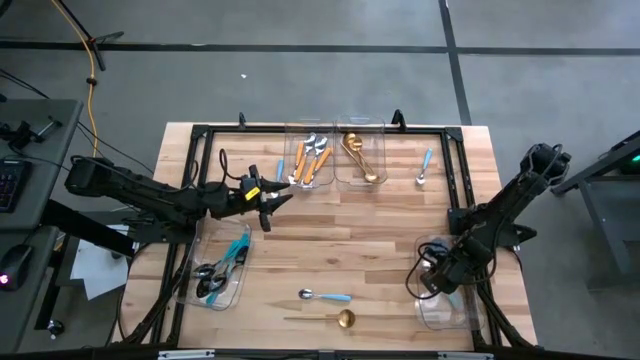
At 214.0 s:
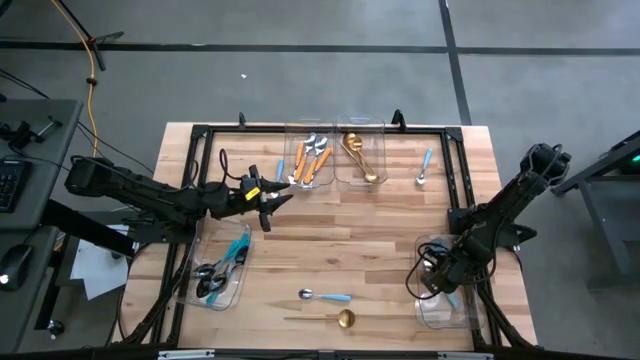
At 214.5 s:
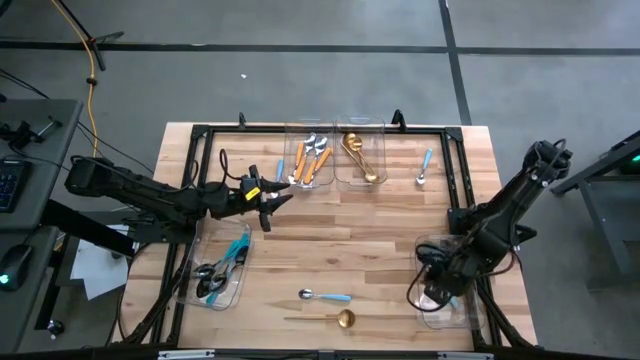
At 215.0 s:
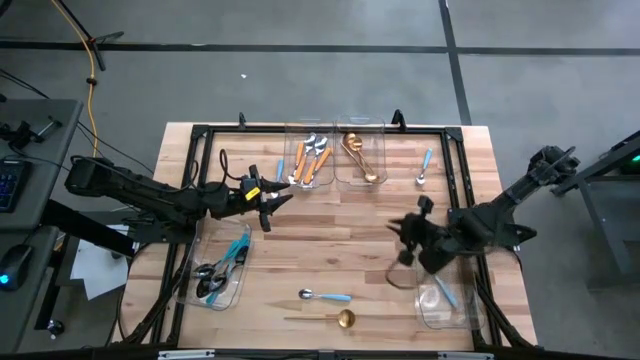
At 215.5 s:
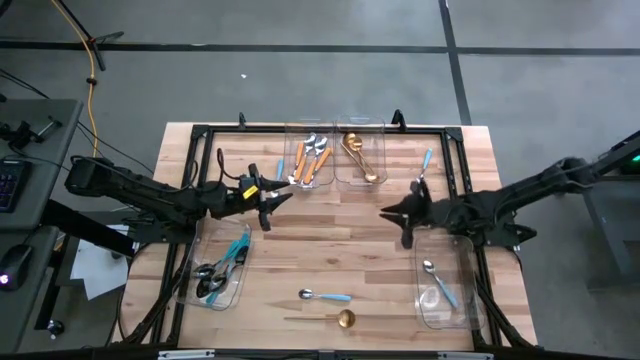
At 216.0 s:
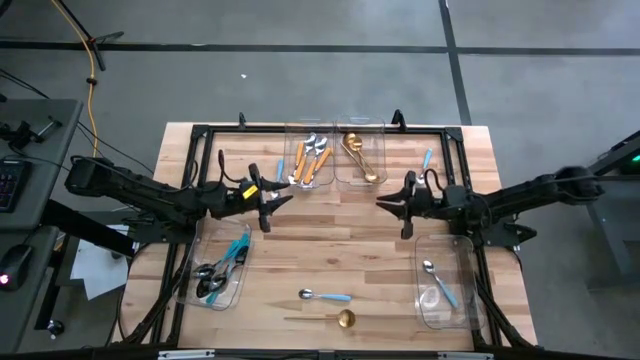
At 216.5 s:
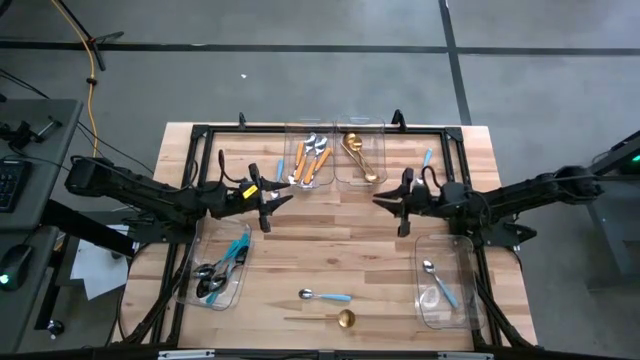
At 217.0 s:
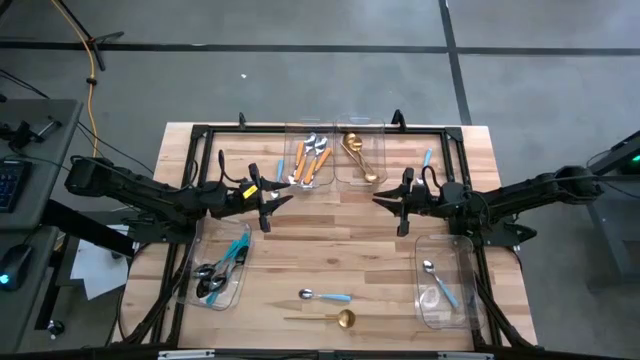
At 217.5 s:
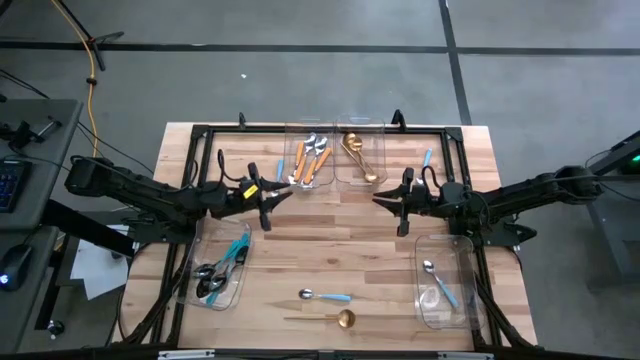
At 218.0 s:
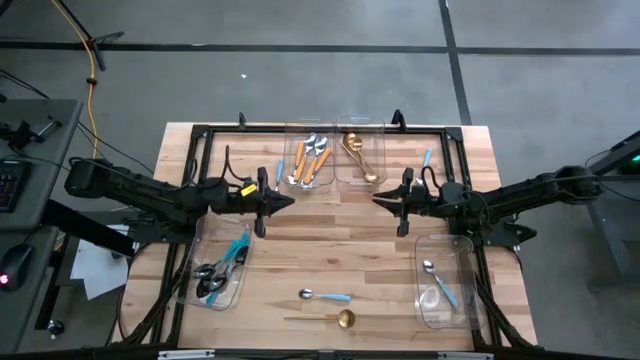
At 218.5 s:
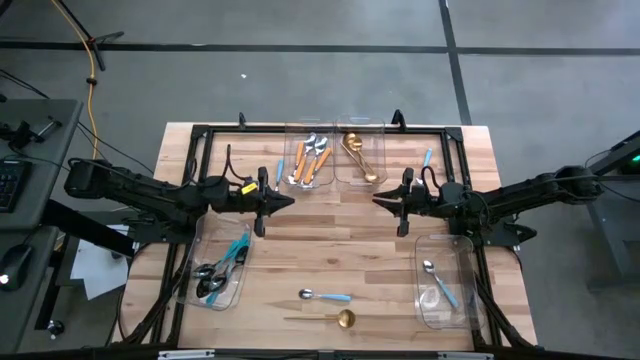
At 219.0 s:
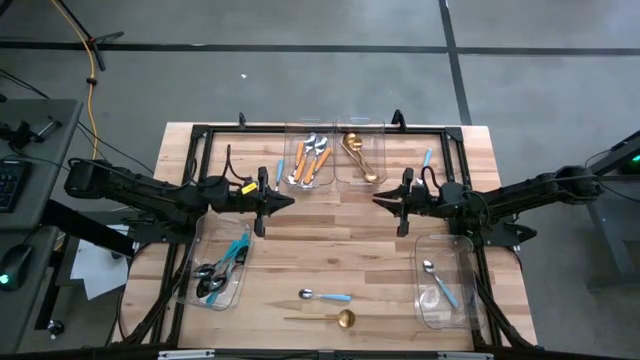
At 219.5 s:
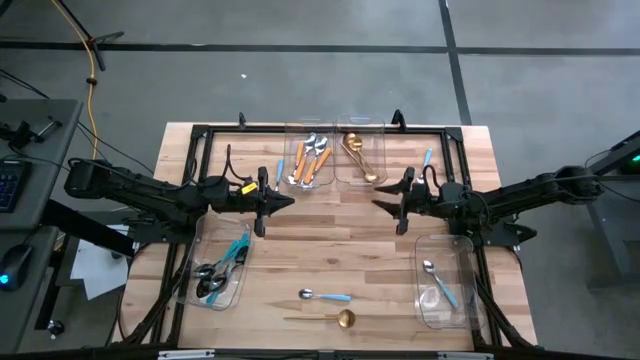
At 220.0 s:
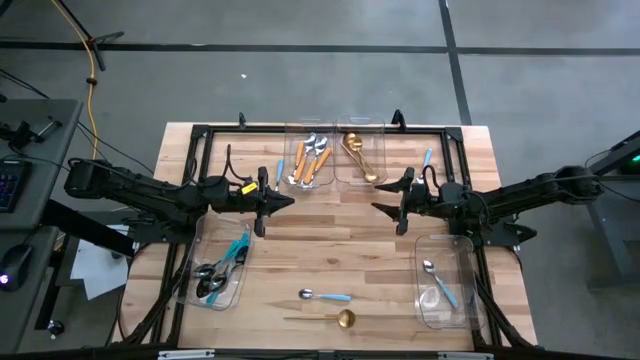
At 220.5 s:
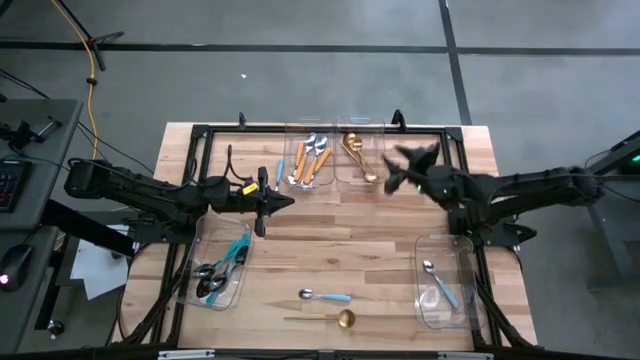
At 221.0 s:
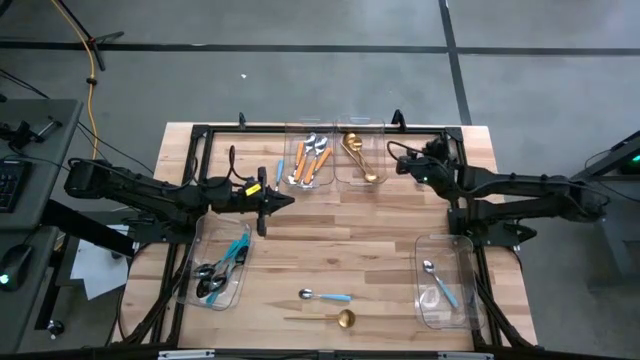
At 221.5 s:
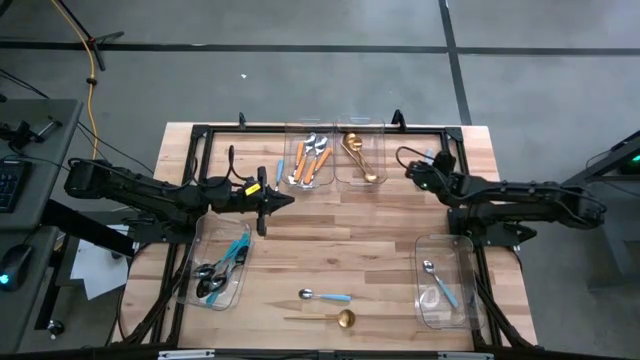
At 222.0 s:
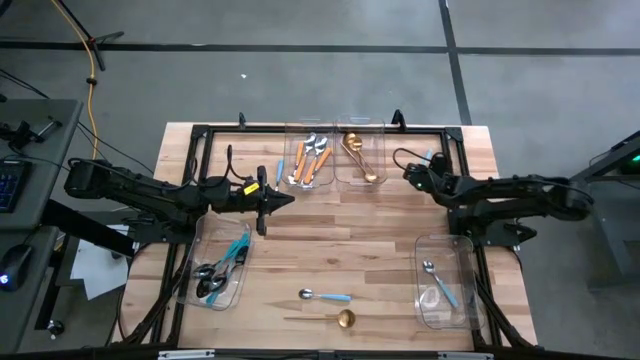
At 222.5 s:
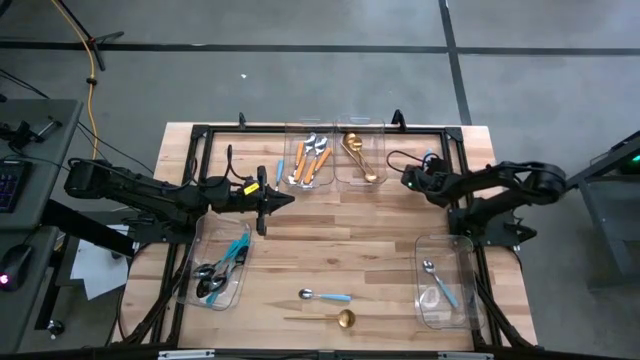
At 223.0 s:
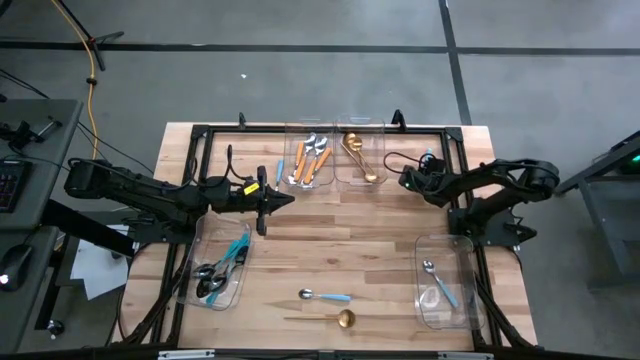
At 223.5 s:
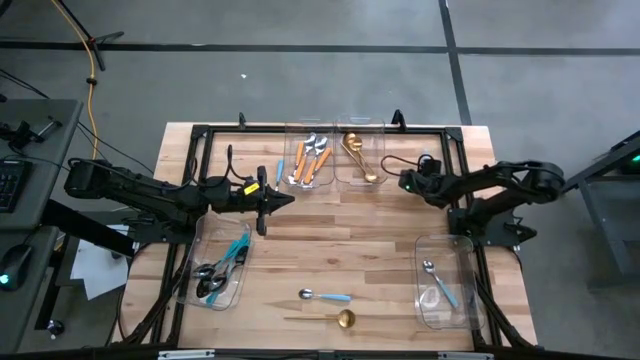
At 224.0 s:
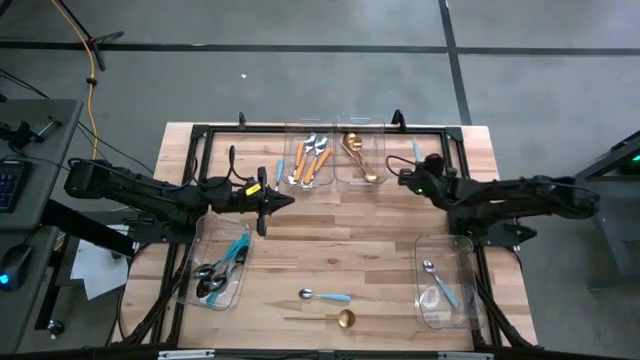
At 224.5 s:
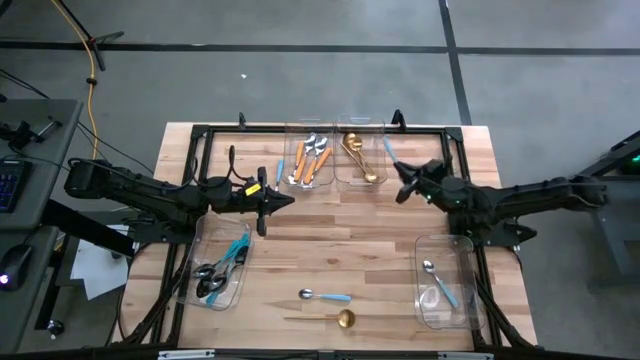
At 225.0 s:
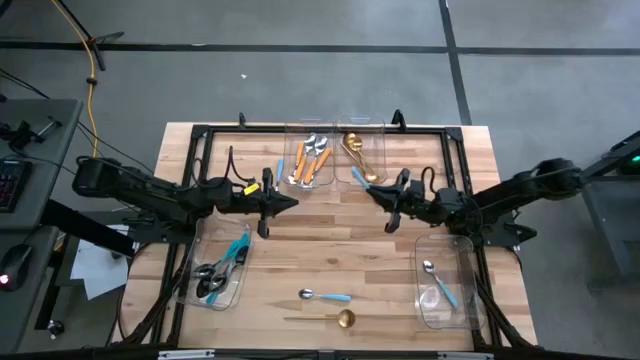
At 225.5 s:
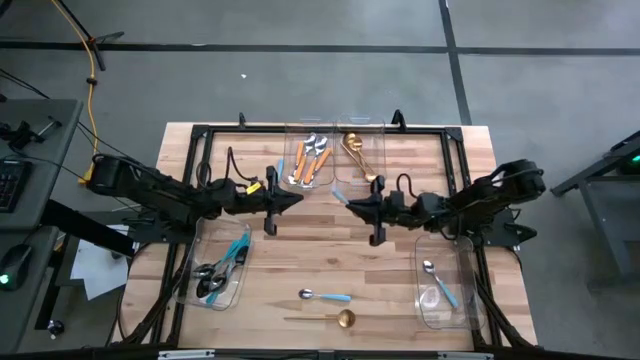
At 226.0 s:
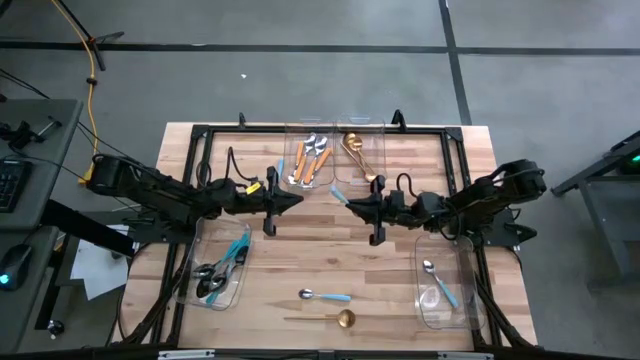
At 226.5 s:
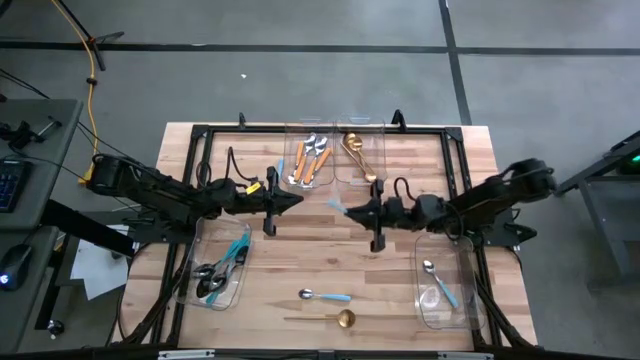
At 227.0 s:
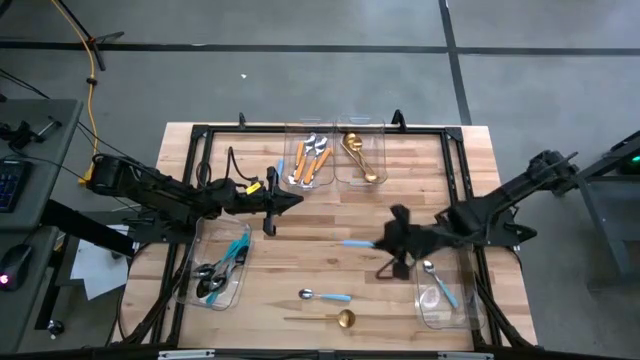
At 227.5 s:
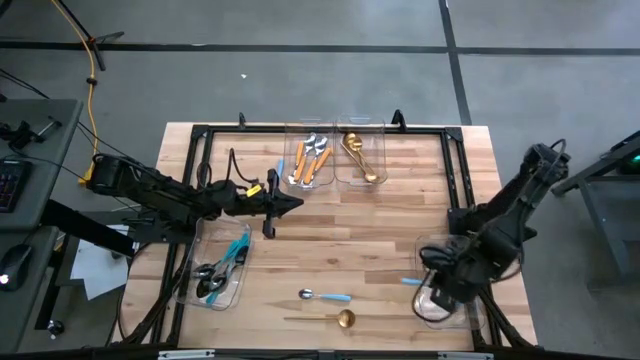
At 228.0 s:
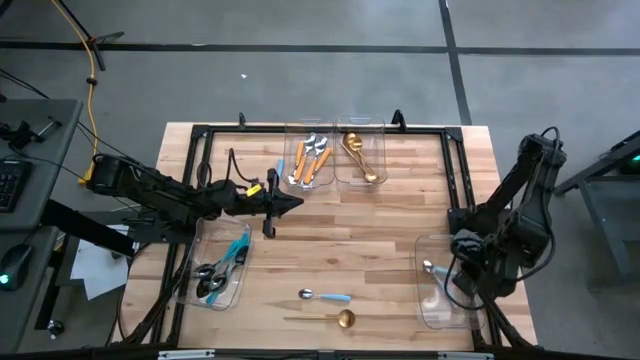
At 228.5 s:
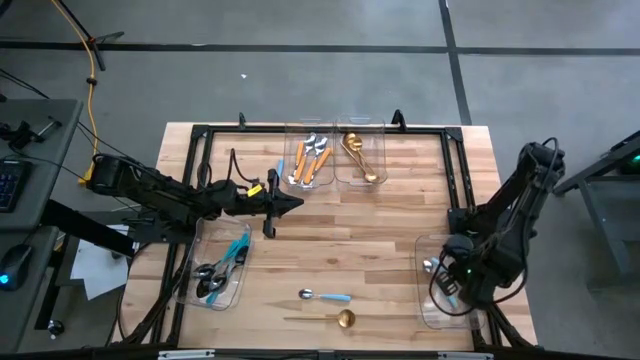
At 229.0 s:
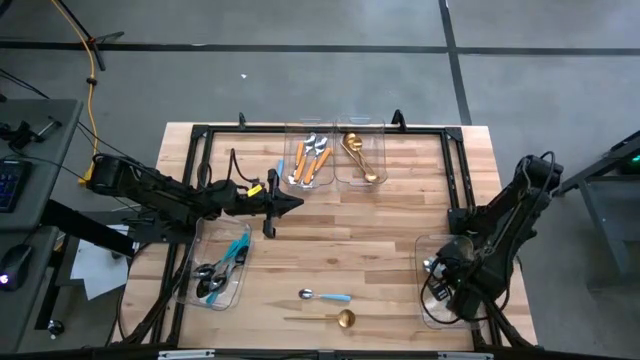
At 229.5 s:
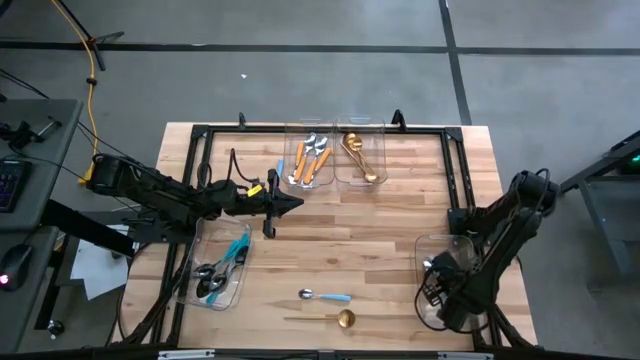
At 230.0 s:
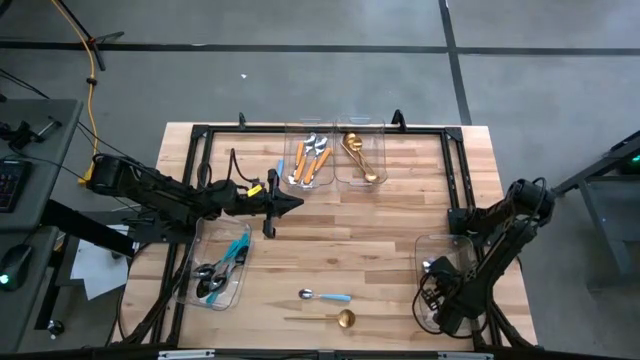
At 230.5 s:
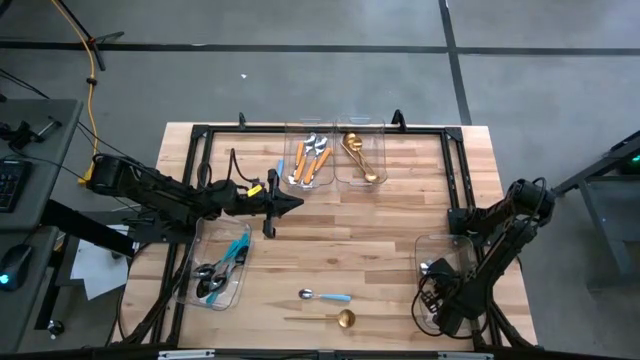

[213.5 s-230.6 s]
Task: Sort silverware by color (type)
Put the blue spoon into the bottom right transparent bin

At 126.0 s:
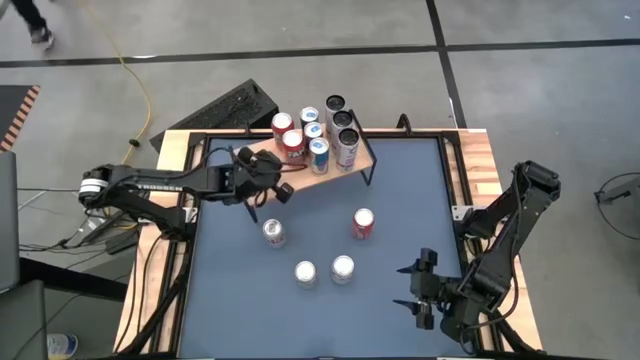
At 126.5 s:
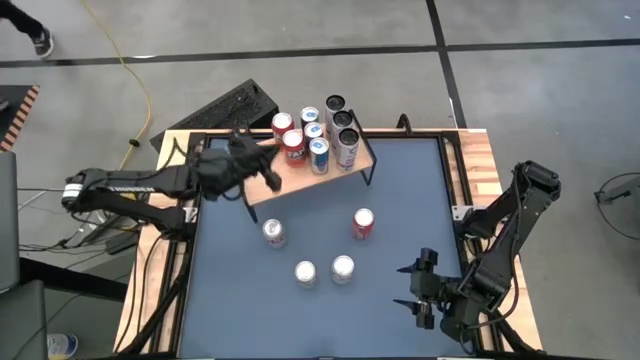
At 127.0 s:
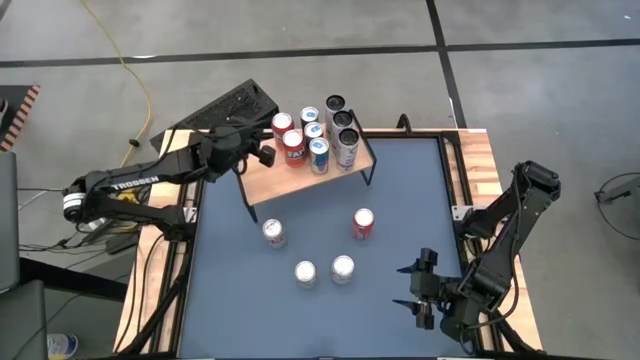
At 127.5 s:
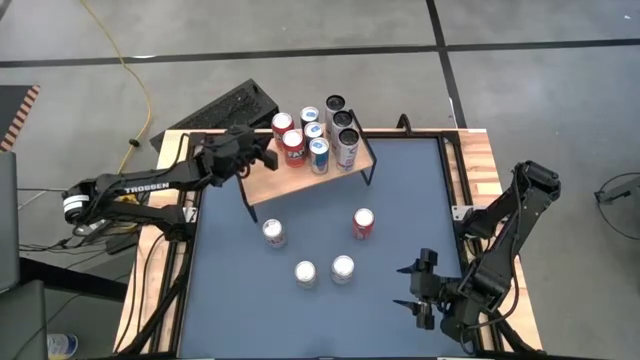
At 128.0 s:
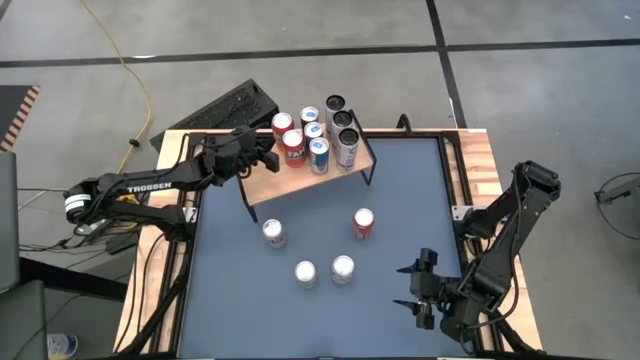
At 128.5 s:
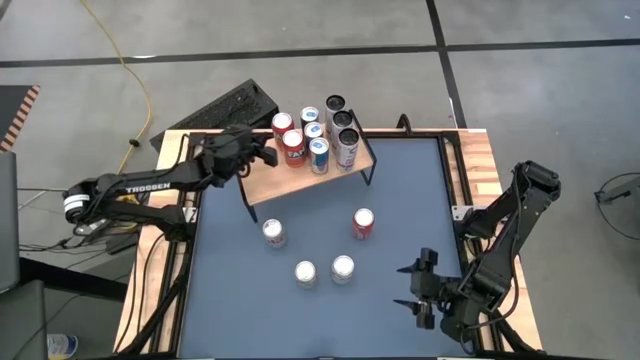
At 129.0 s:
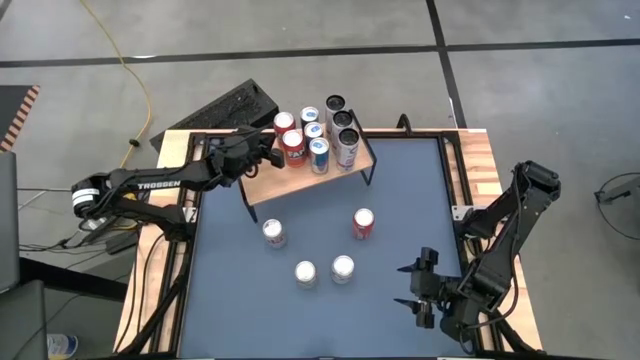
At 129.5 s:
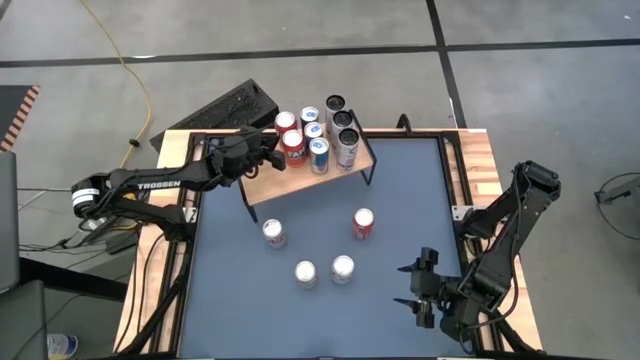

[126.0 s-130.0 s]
Task: Place canned beverage on shelf
Adjust the red soda can on the shelf
